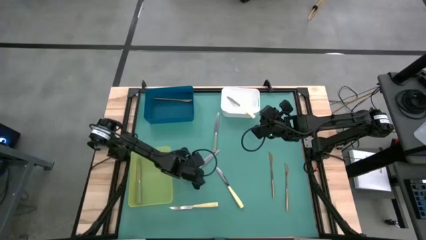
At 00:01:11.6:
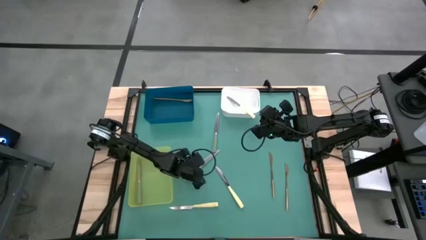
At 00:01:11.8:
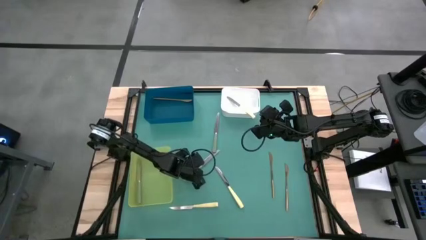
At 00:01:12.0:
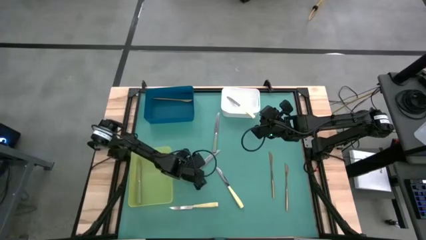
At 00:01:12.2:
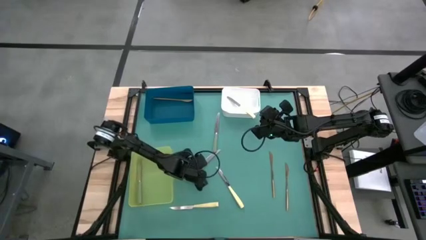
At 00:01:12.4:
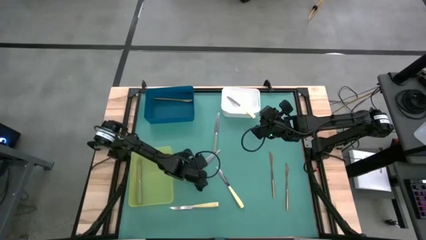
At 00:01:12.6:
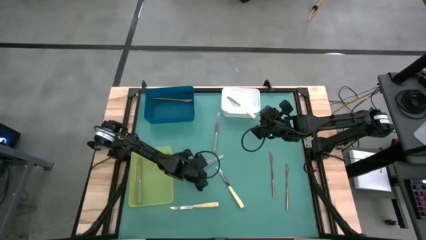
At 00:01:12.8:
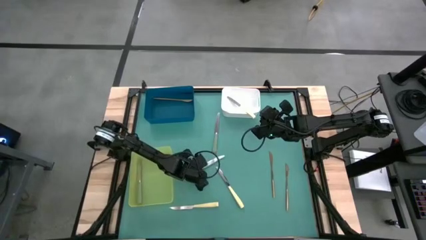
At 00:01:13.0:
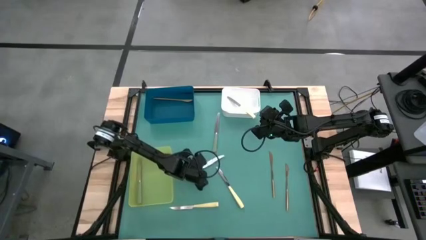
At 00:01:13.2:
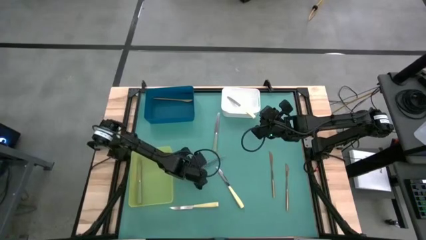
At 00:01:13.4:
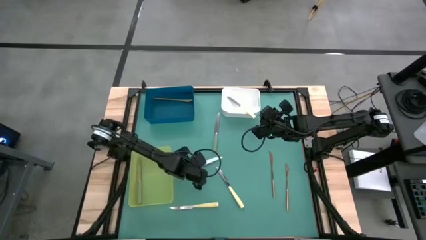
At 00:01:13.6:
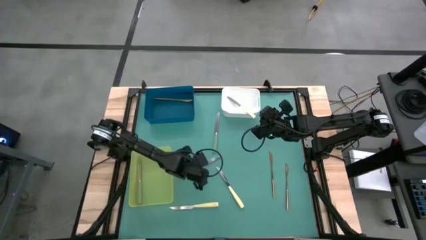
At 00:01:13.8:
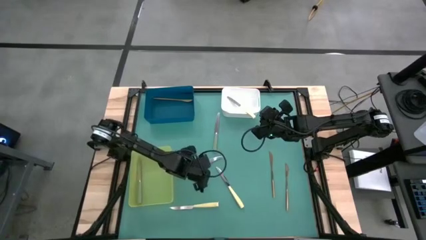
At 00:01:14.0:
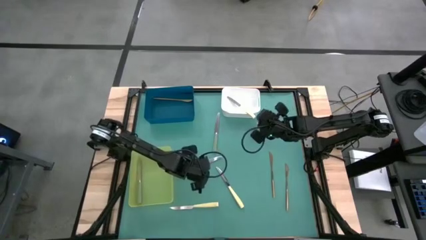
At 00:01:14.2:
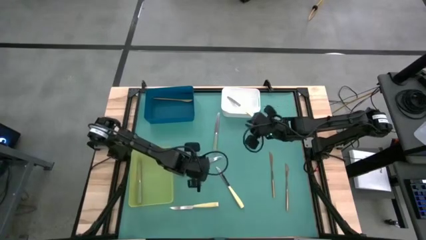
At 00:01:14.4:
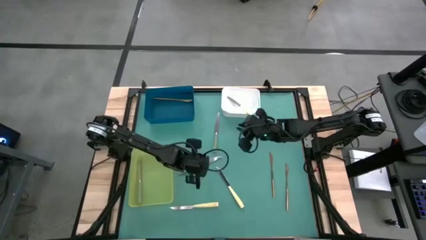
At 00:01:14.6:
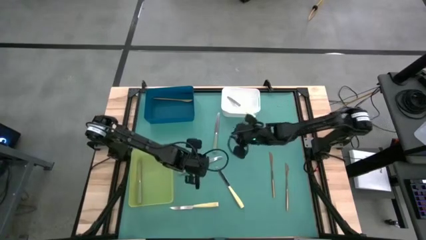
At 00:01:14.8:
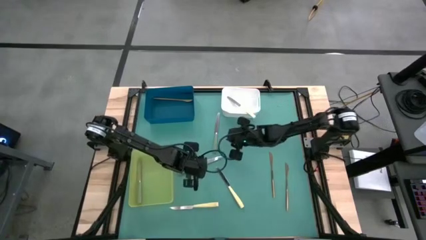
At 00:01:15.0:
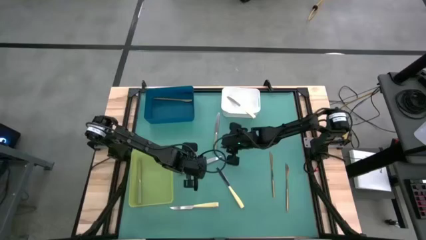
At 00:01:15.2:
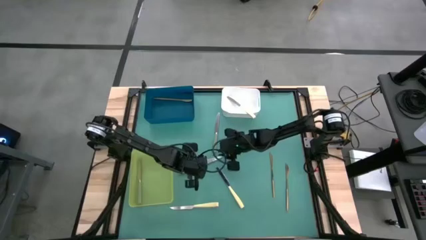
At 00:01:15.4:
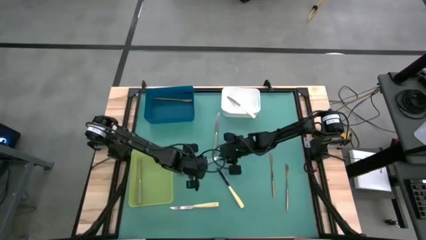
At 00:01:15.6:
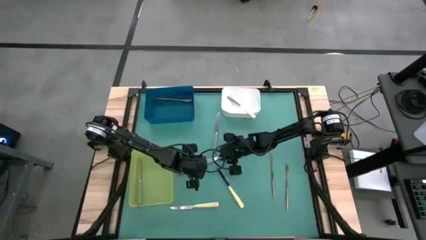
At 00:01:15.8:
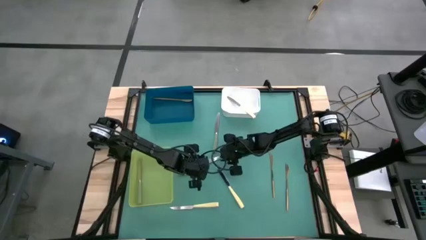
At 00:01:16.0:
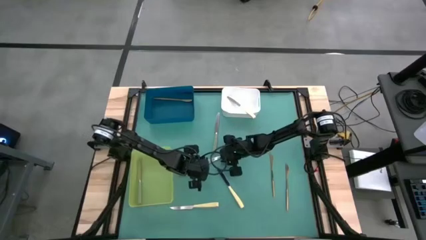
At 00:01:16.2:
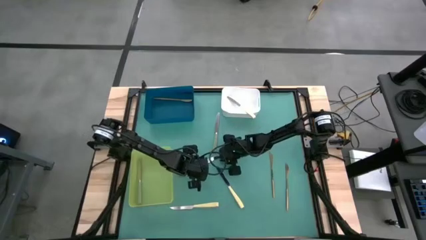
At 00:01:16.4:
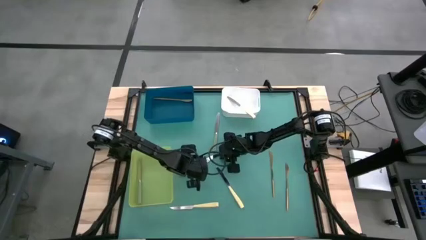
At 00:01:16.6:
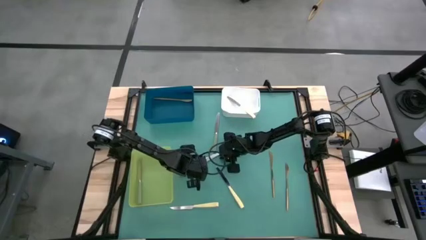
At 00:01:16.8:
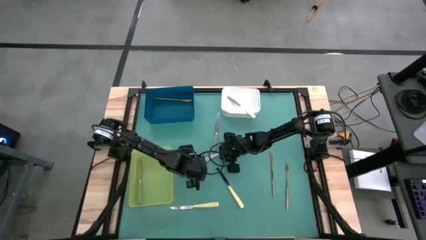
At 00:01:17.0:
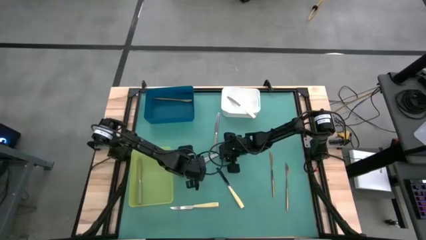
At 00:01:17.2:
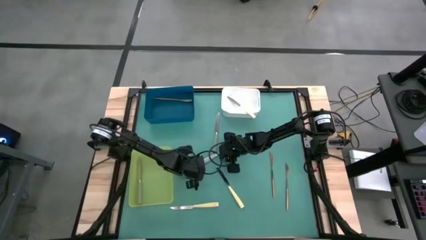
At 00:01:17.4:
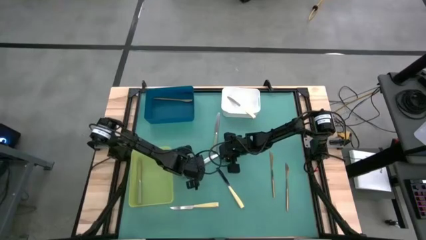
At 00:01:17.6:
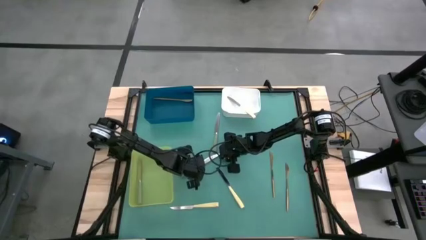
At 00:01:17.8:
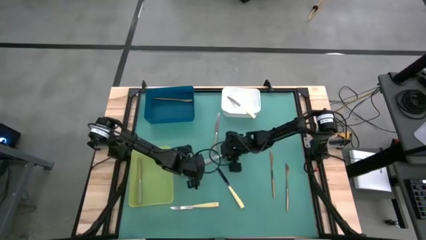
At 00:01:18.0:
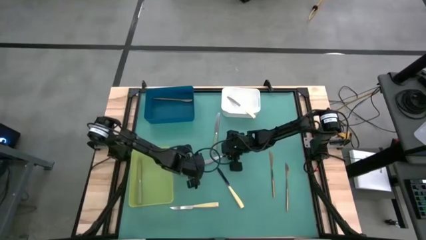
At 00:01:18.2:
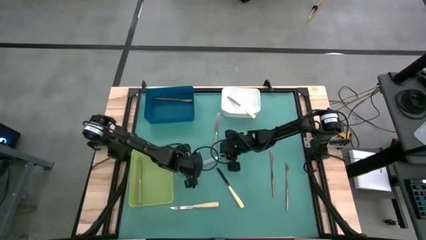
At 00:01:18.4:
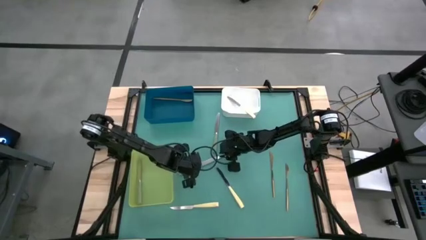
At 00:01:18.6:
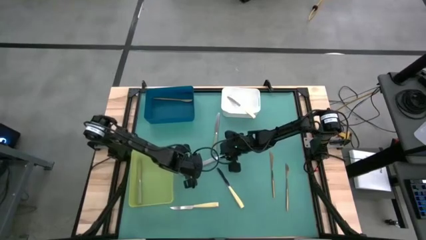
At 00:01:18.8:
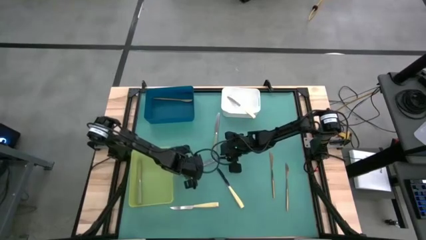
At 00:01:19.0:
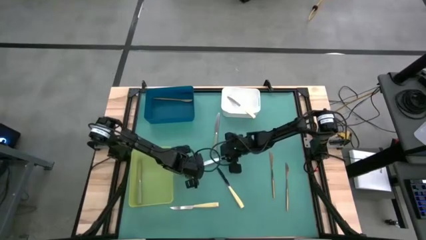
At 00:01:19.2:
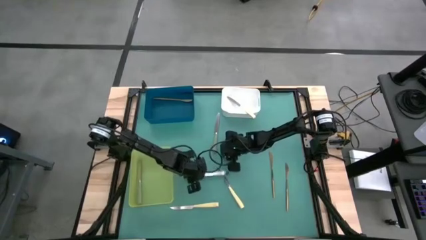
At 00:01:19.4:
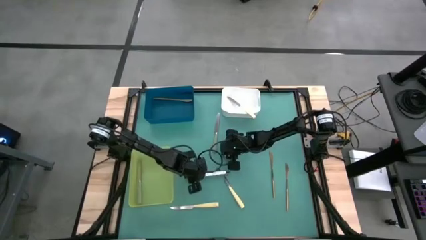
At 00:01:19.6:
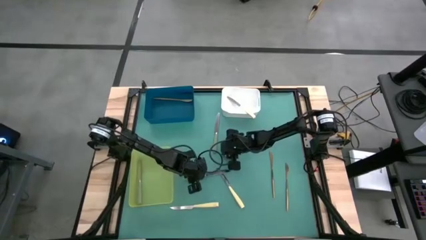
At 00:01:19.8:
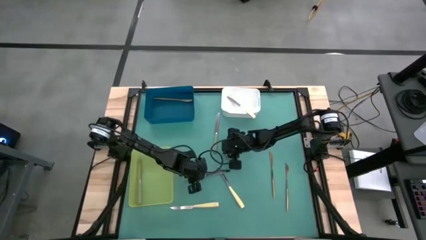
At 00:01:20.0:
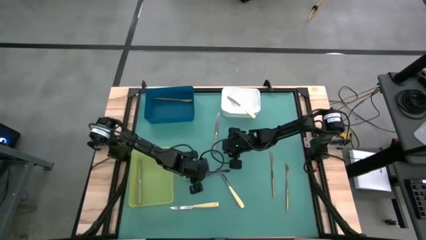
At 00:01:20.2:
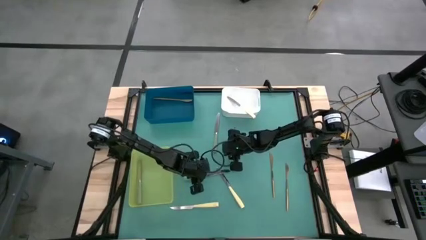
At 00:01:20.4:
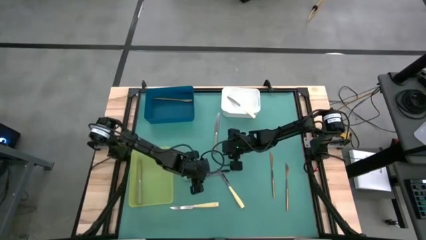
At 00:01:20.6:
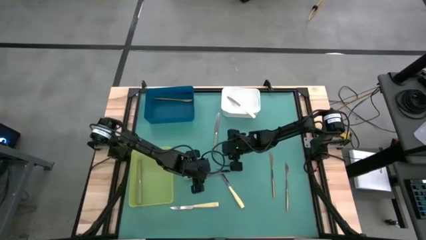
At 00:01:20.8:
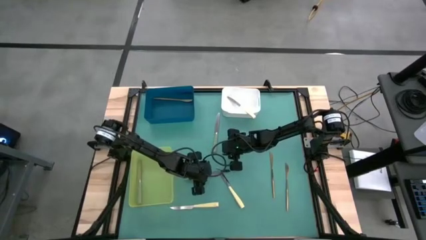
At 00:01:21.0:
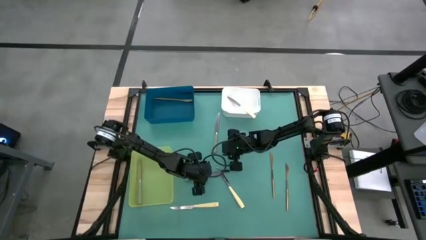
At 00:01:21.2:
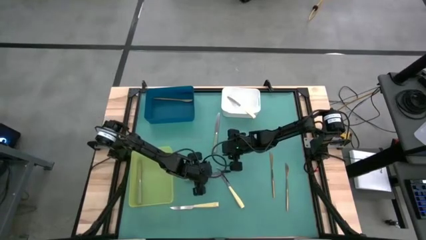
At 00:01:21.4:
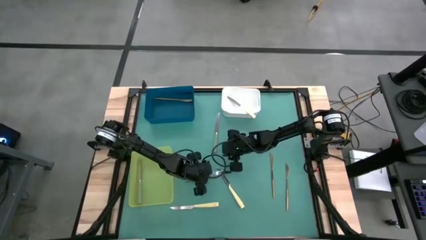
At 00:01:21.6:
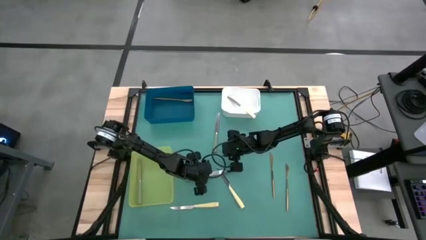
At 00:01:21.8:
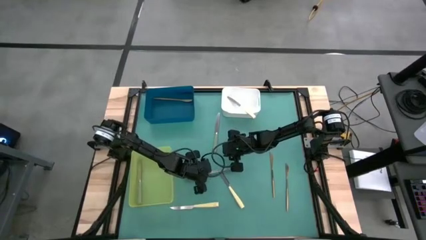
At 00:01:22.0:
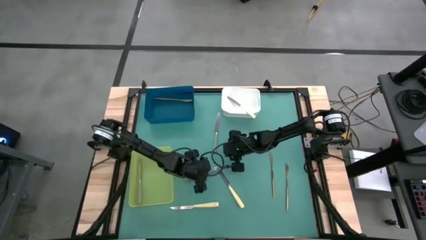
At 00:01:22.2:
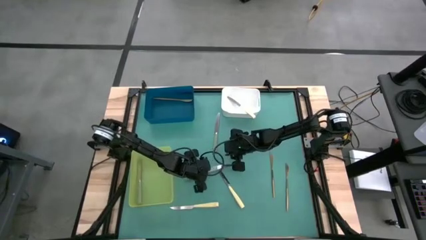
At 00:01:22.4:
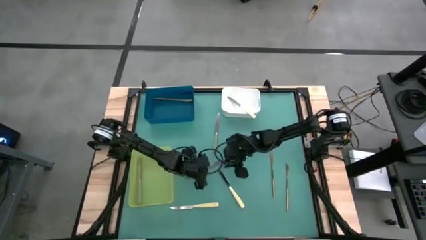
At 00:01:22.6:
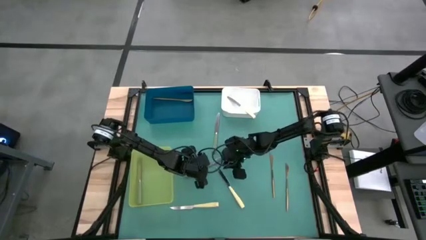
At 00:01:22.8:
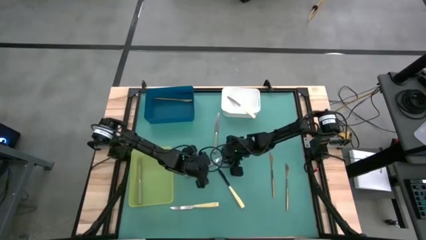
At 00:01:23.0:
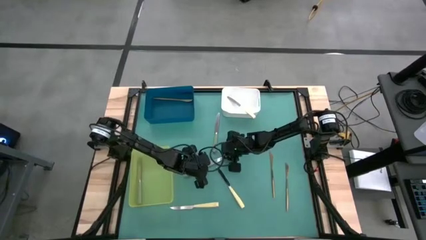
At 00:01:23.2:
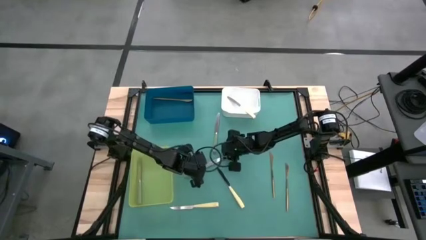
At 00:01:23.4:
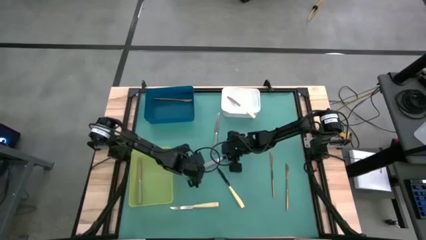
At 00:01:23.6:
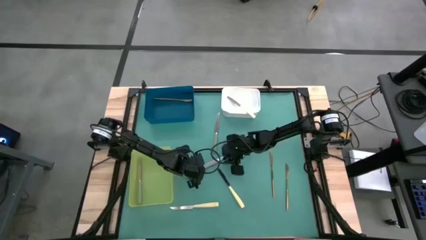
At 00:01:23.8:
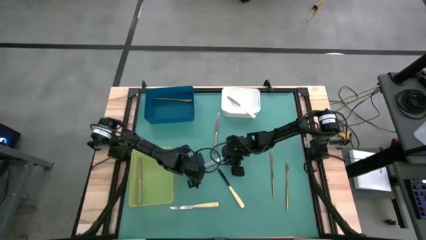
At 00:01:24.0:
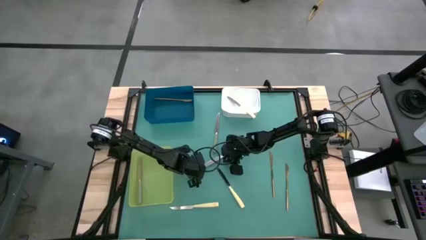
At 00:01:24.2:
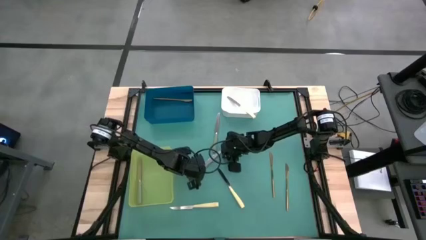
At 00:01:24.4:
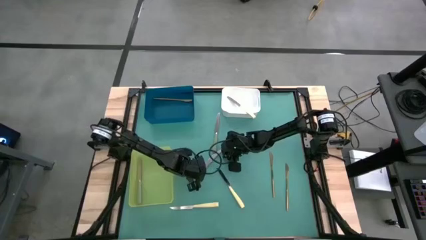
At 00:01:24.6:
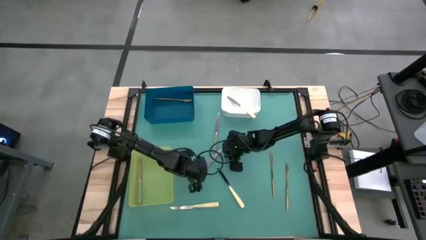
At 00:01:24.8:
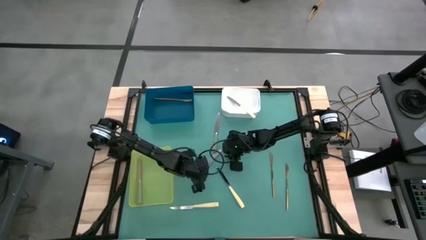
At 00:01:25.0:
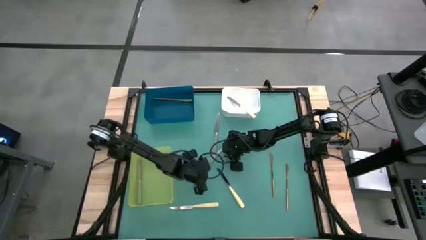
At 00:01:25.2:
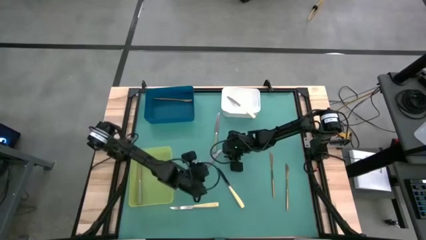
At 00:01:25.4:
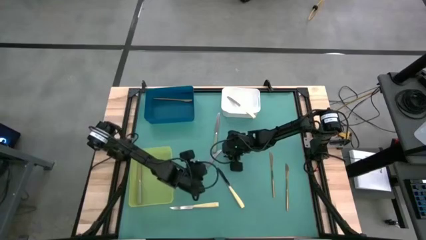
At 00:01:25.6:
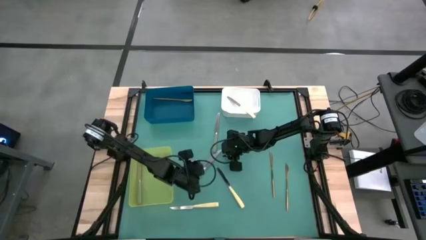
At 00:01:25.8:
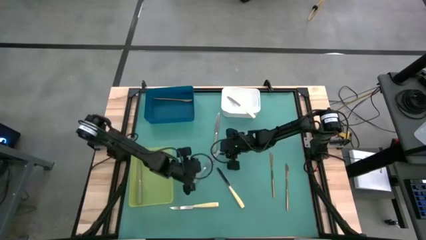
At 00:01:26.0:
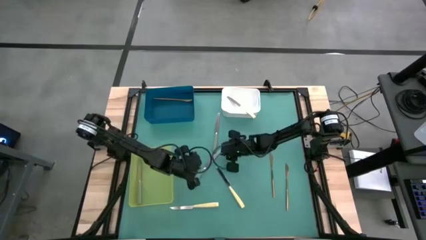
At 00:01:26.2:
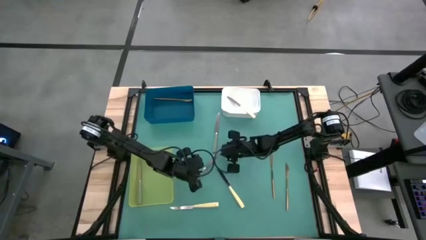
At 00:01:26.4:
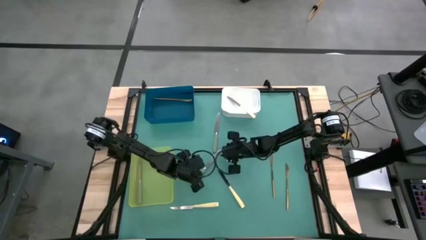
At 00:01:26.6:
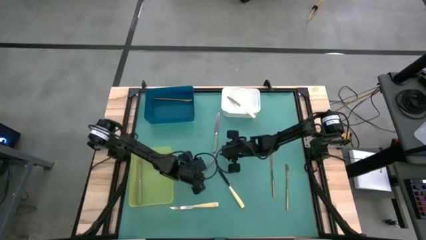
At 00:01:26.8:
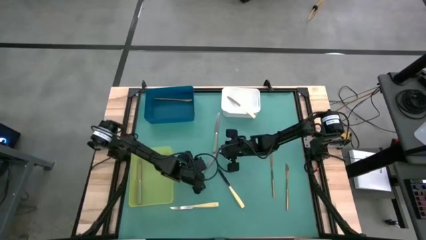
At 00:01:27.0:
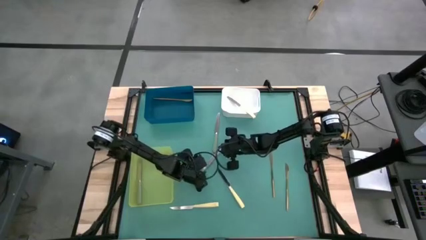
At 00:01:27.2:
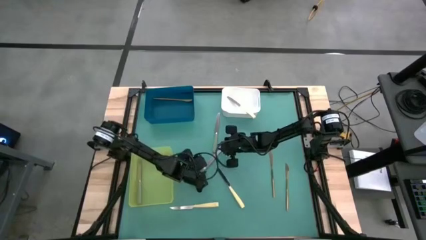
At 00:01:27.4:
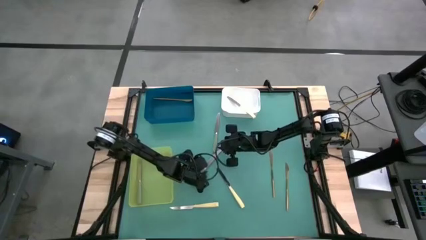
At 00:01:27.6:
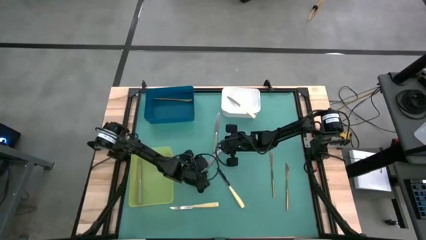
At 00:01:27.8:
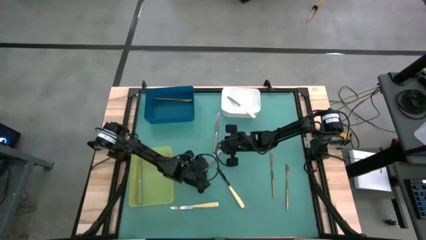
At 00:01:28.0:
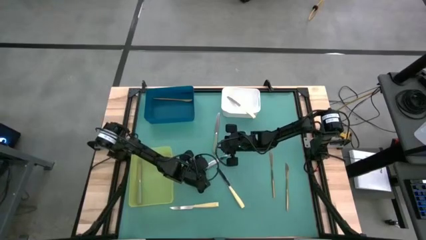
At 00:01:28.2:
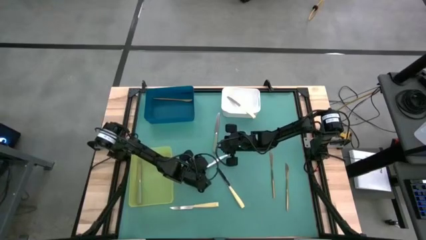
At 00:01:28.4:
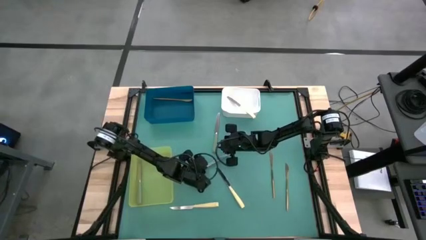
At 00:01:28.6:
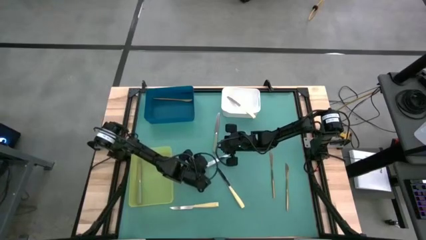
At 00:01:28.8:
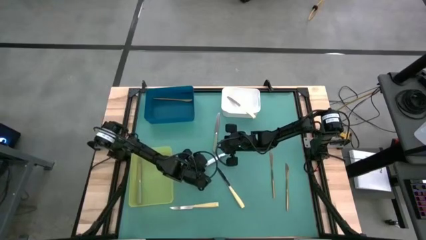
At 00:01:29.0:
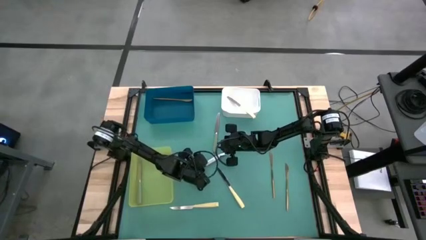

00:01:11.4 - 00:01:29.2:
Task: Sort silverware by color (type)
Put the bottom green knife into the green bin
